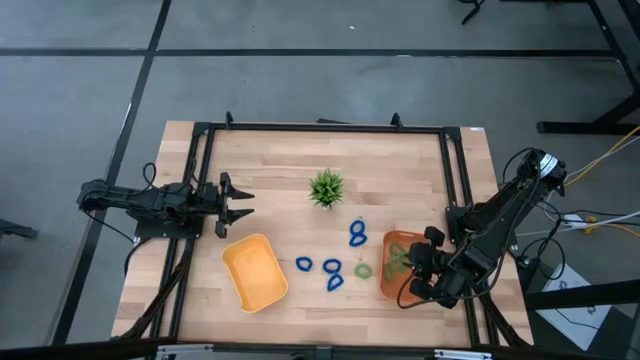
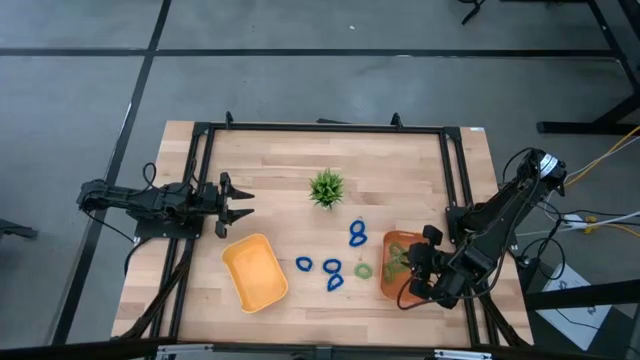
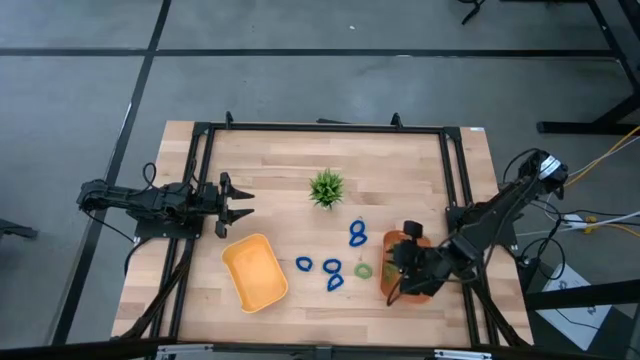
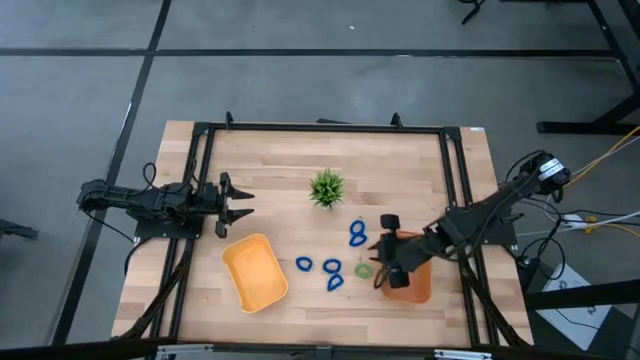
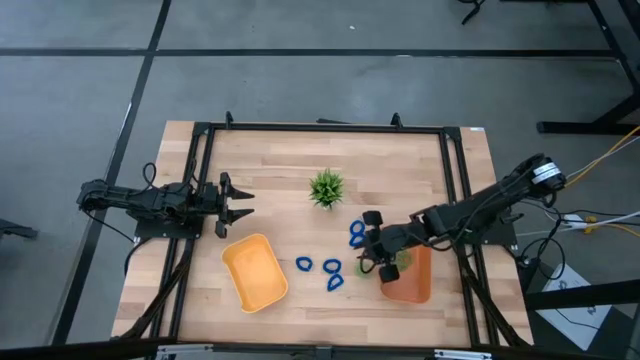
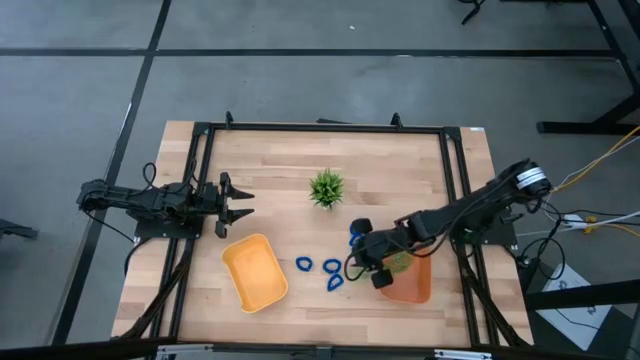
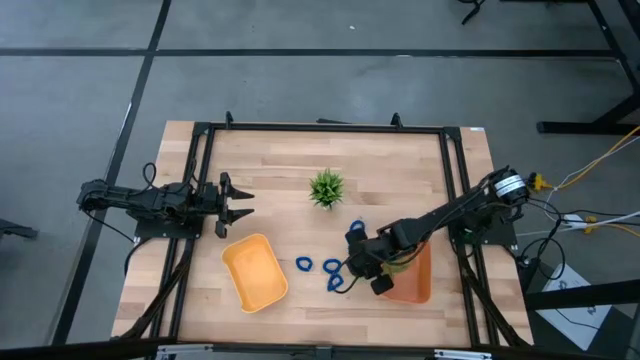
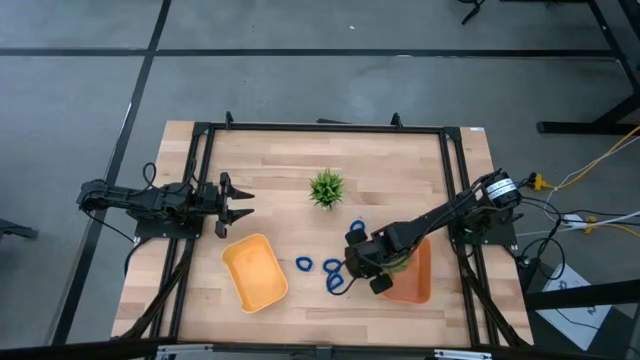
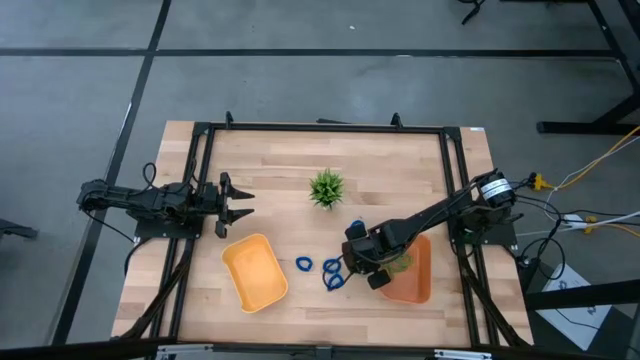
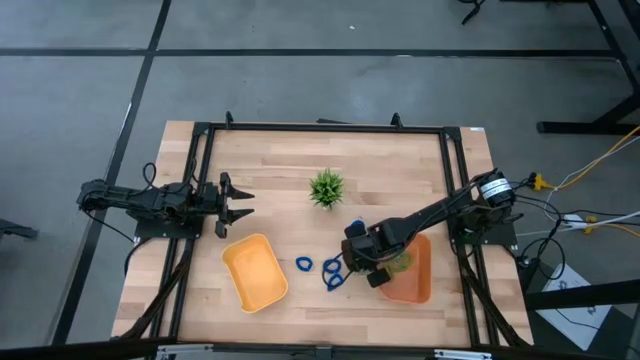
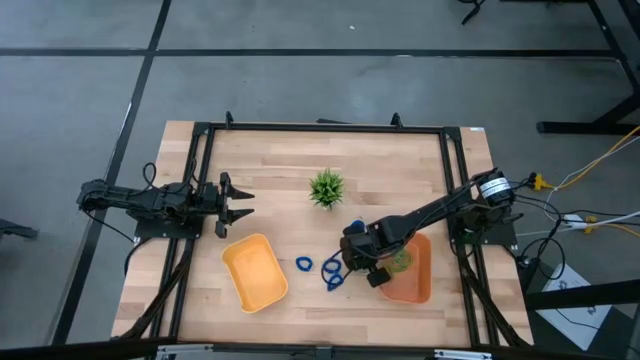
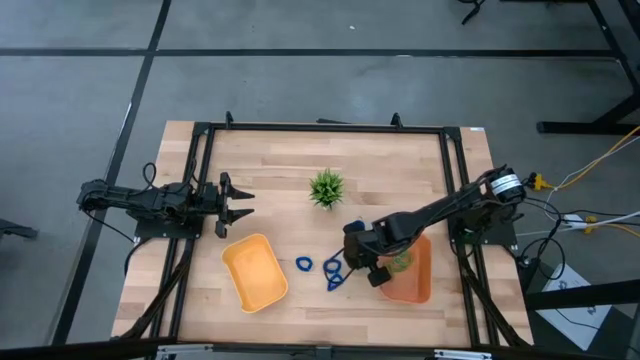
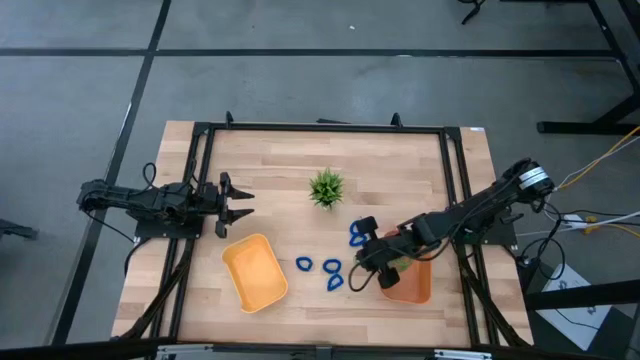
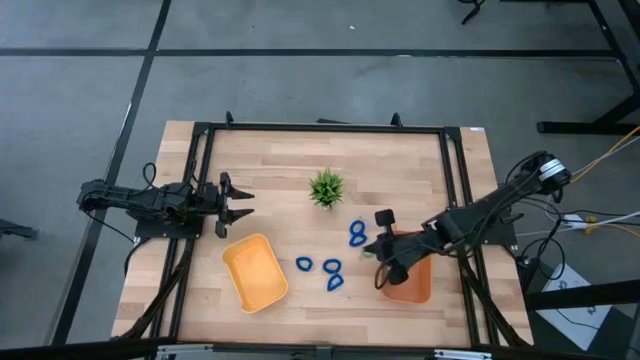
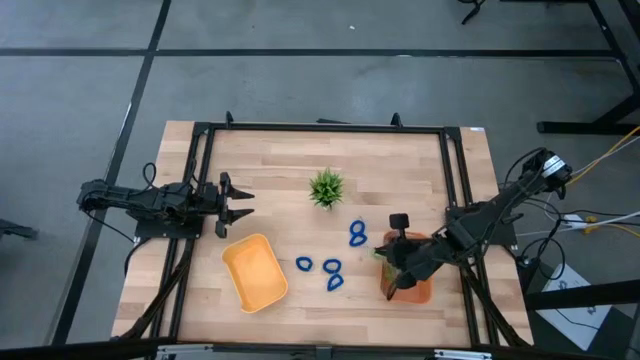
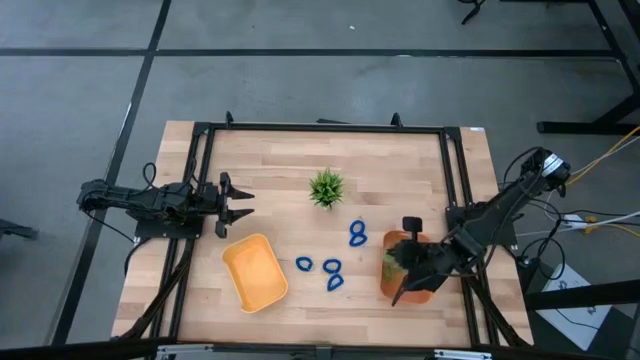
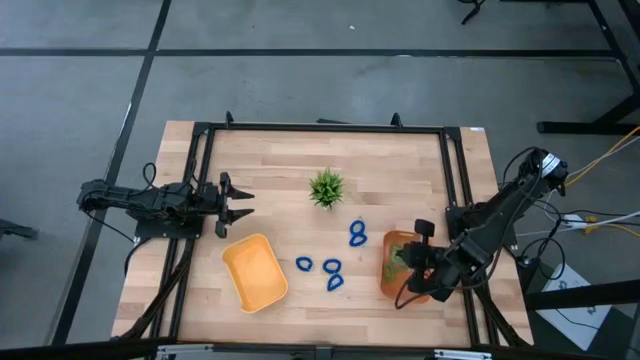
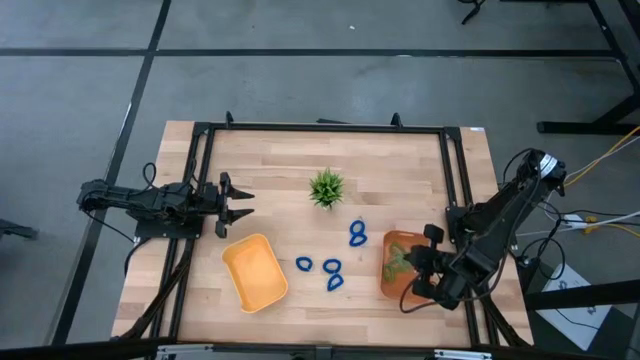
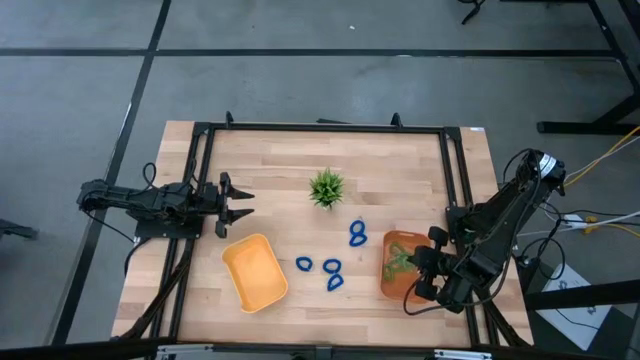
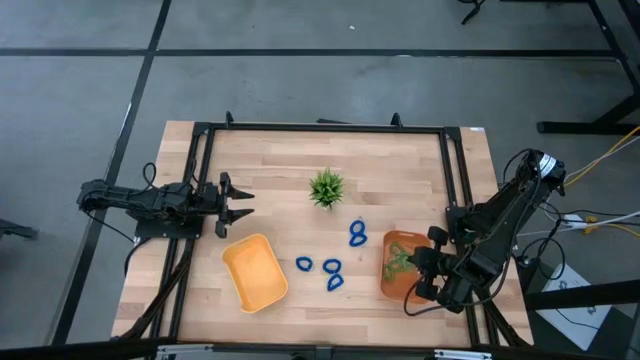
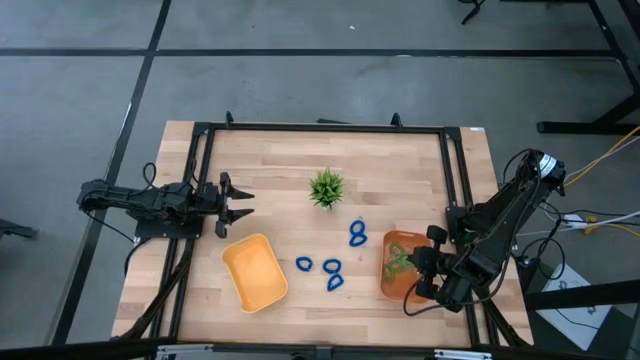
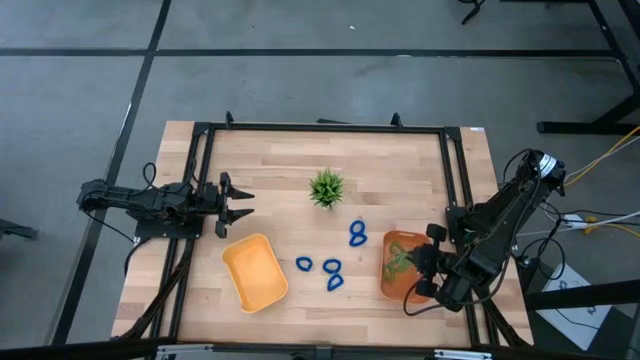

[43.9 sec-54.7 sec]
Task: Sort spring keychains
Put the green spring keychain into the orange bin

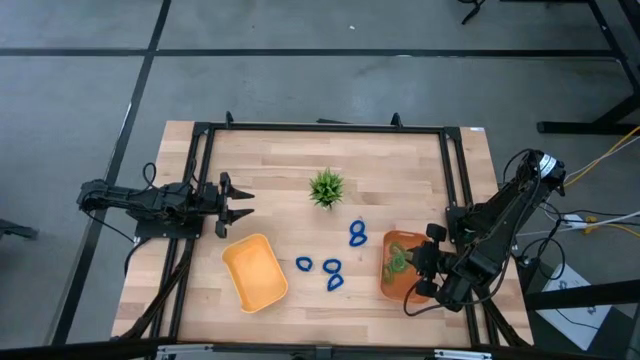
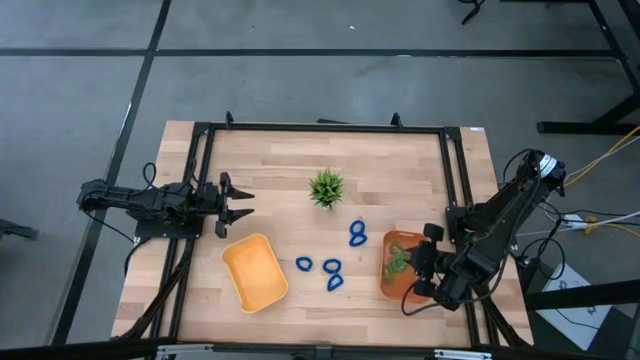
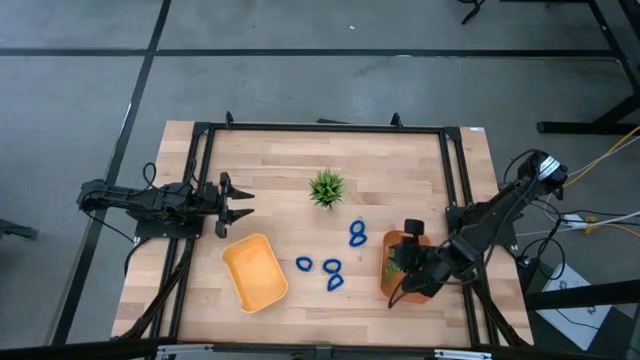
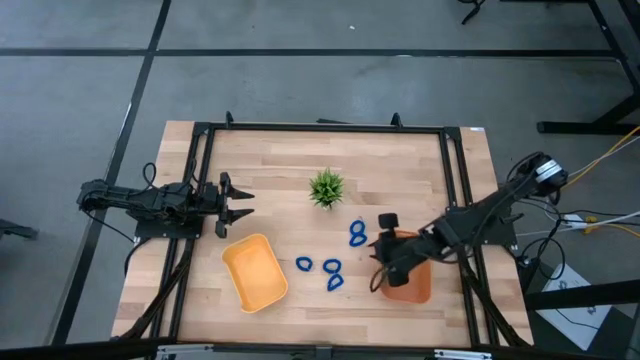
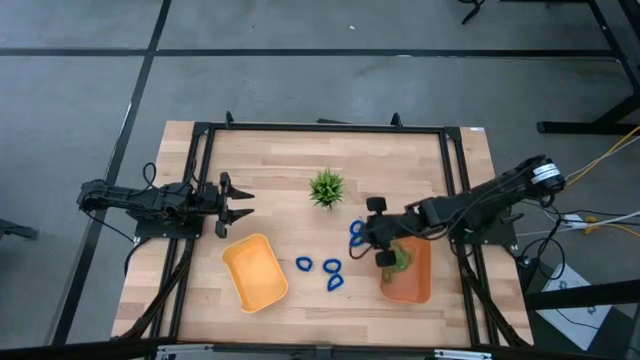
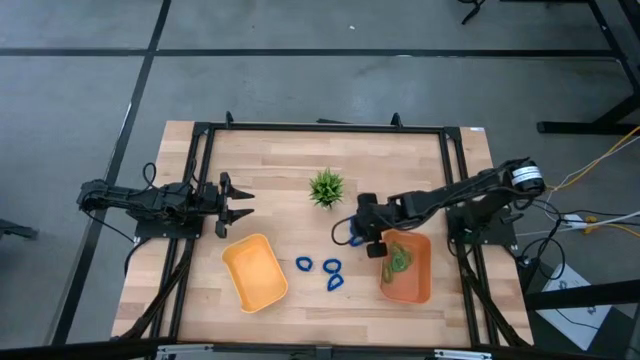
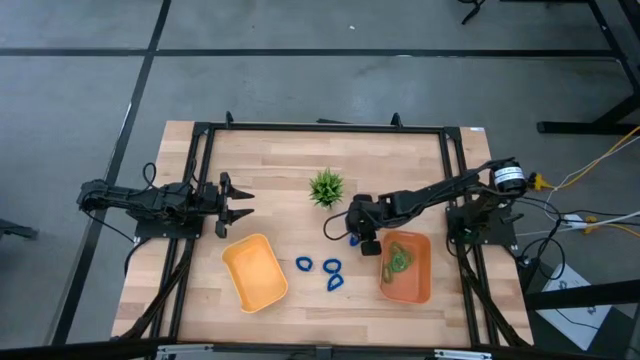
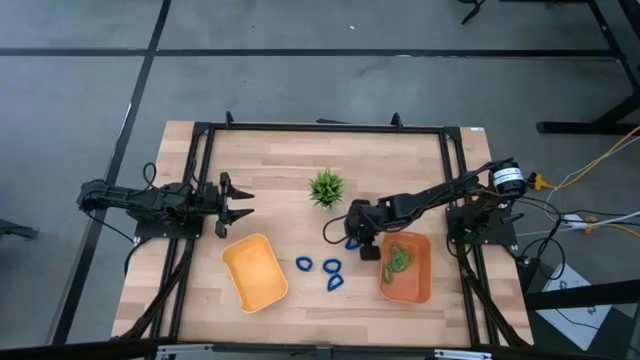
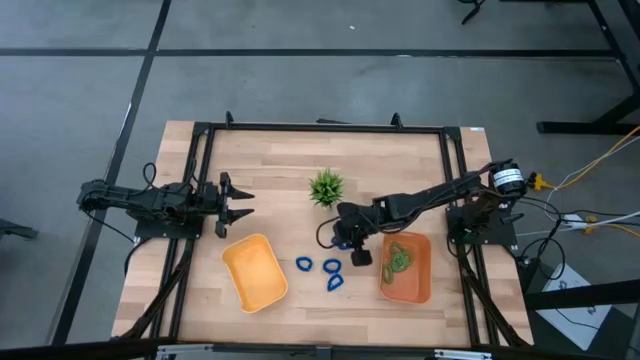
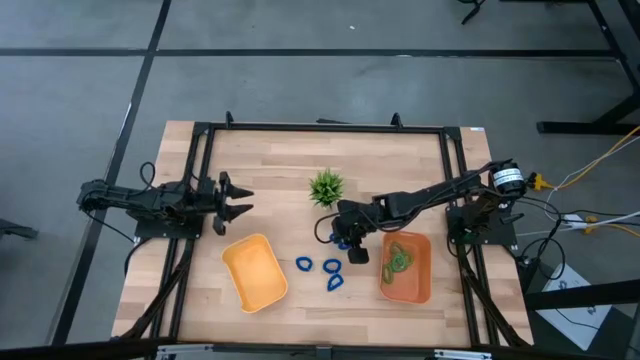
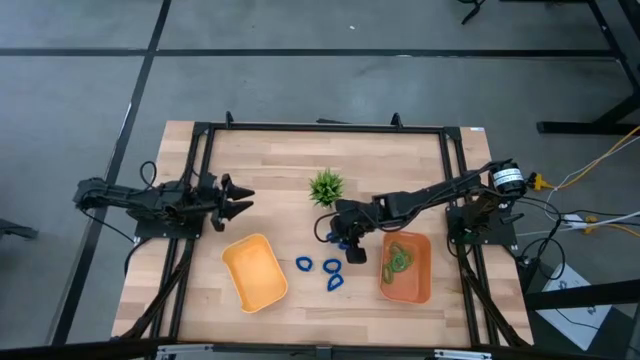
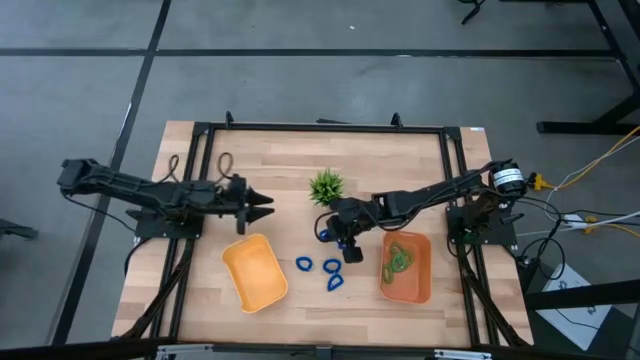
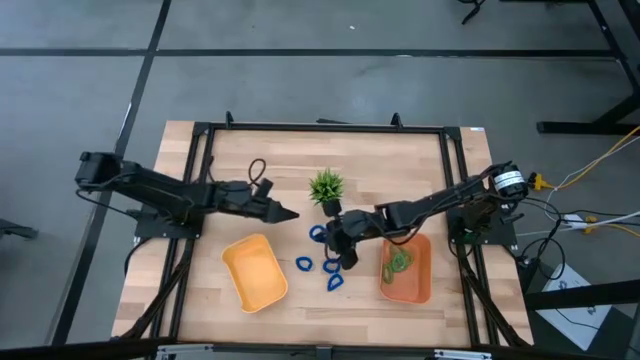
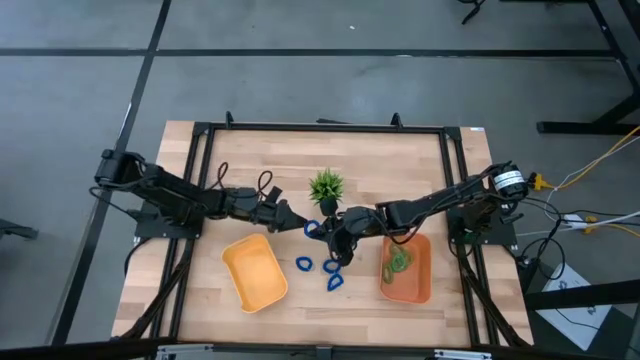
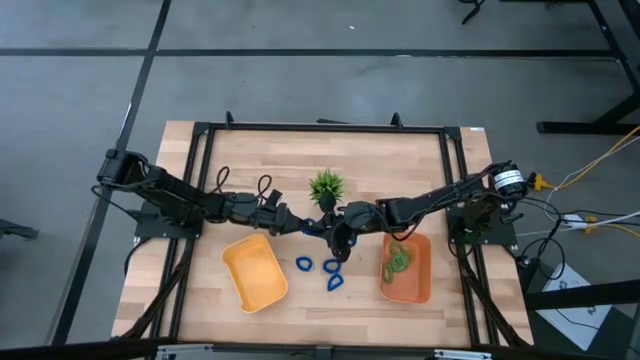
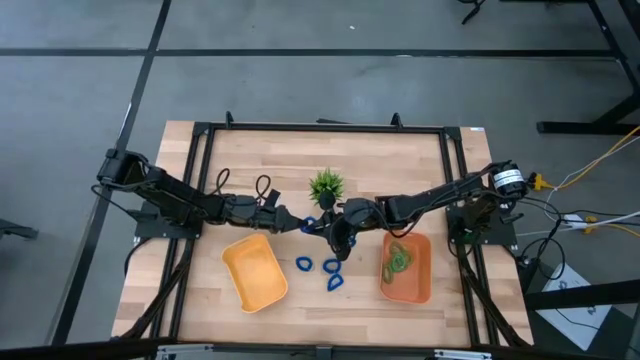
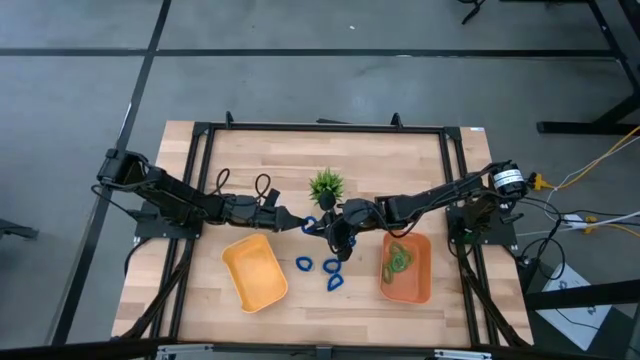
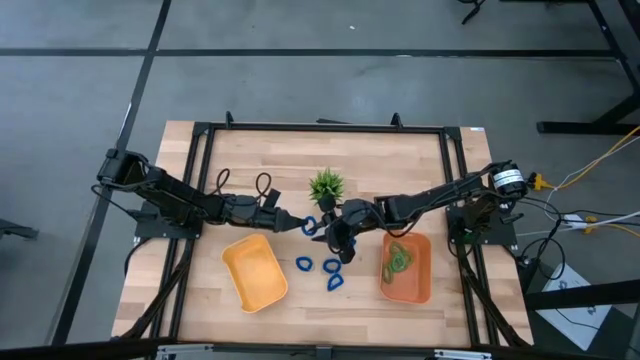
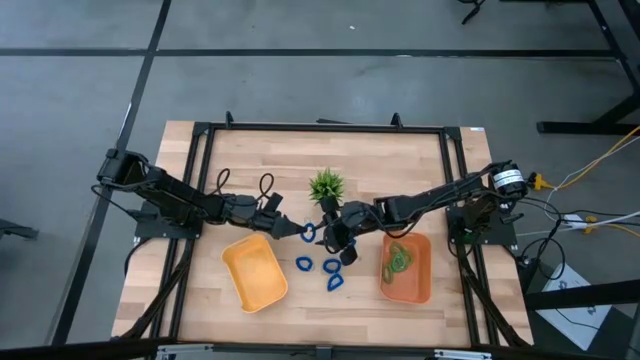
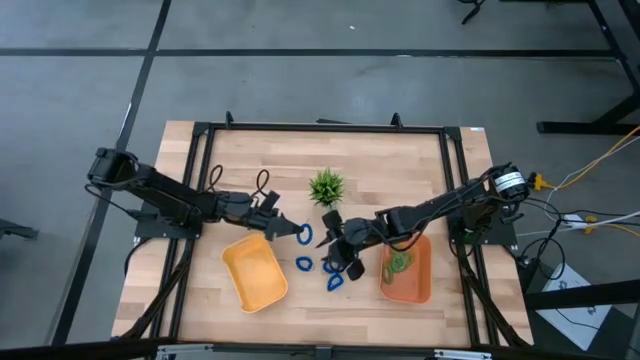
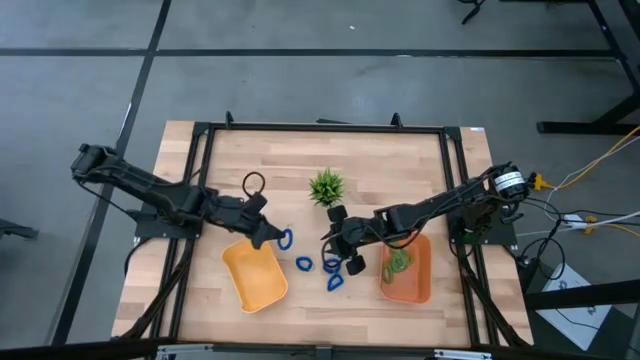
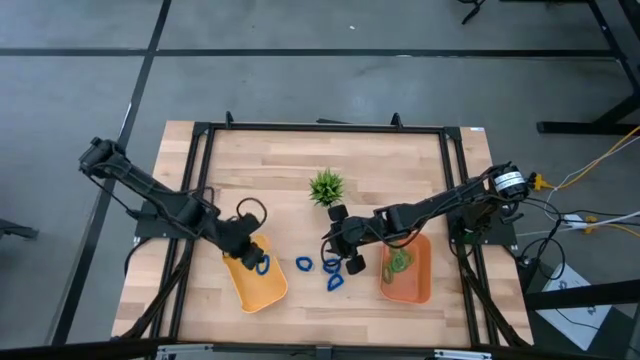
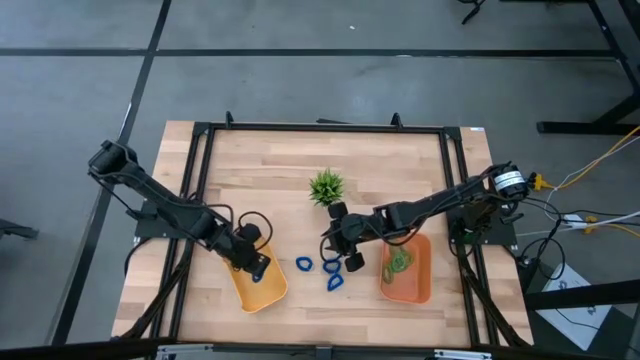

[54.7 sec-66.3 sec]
Put the blue spring keychain into the yellow bin
